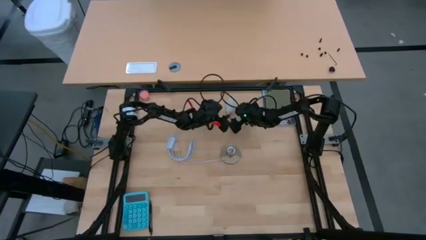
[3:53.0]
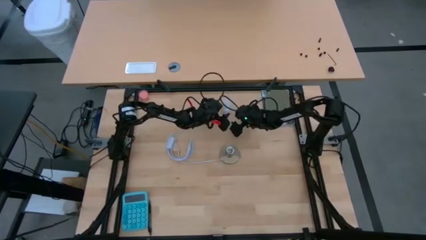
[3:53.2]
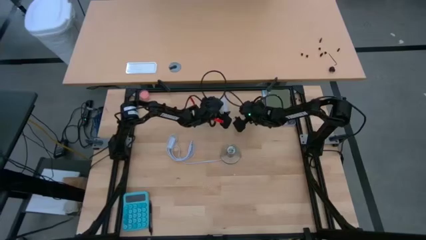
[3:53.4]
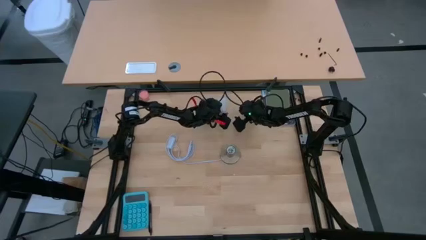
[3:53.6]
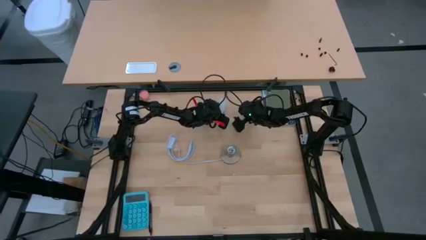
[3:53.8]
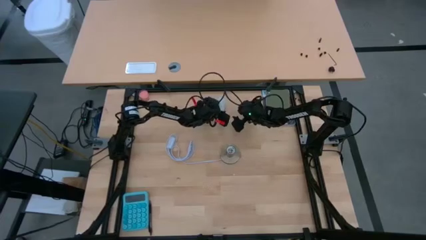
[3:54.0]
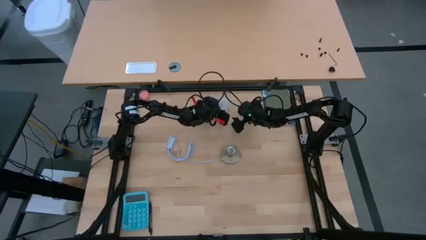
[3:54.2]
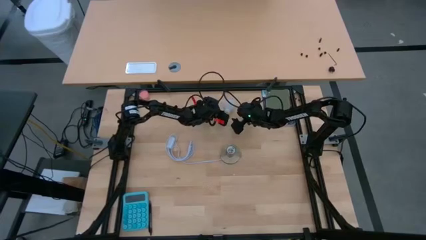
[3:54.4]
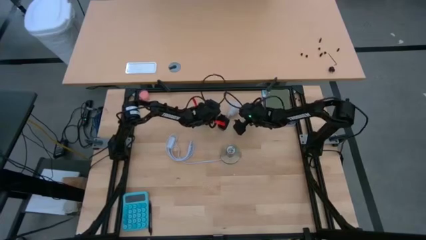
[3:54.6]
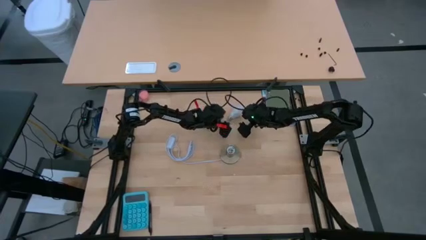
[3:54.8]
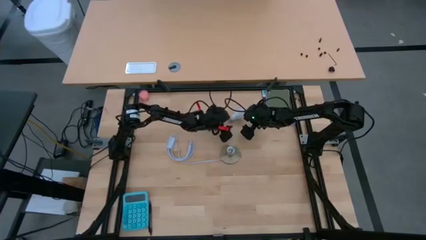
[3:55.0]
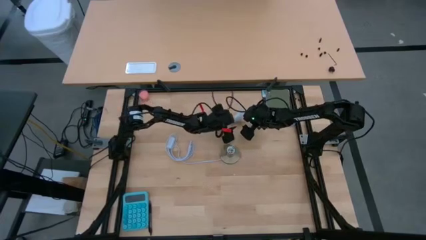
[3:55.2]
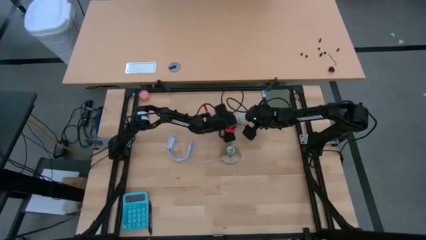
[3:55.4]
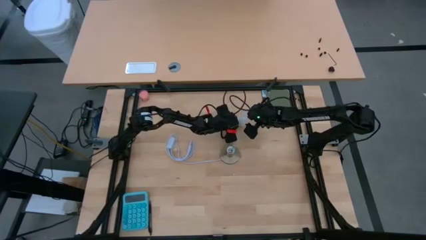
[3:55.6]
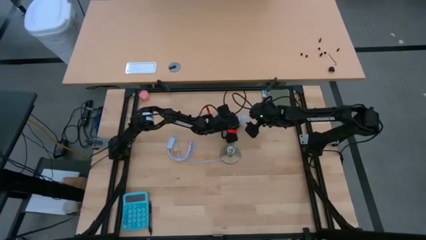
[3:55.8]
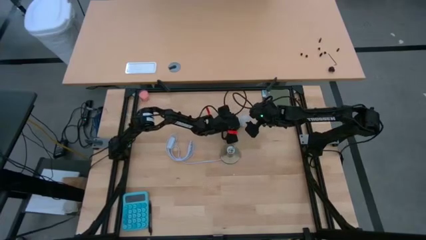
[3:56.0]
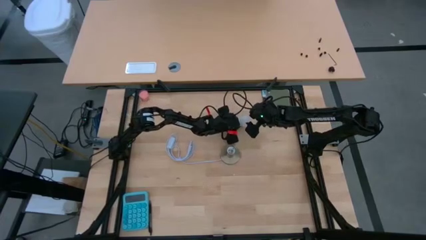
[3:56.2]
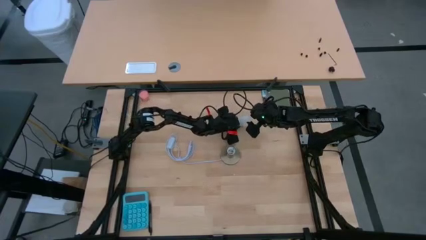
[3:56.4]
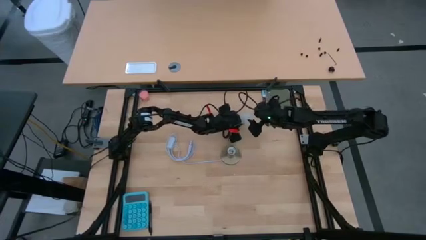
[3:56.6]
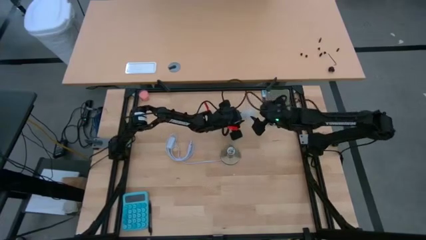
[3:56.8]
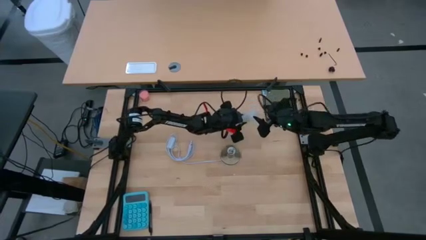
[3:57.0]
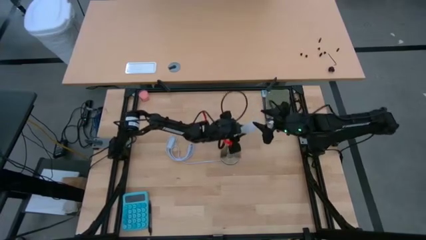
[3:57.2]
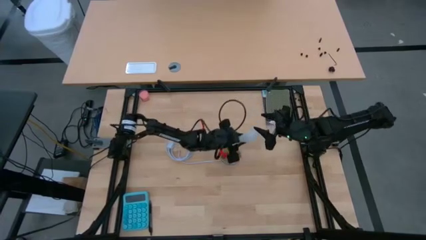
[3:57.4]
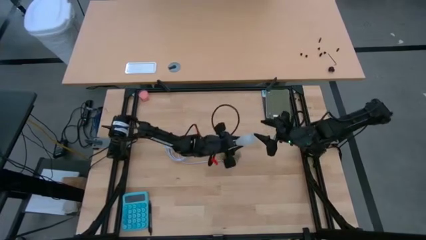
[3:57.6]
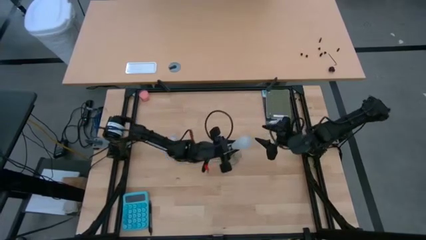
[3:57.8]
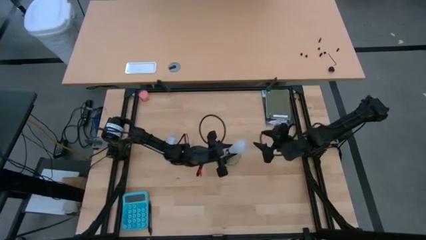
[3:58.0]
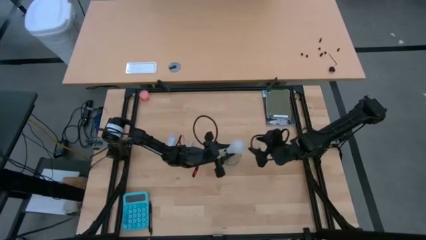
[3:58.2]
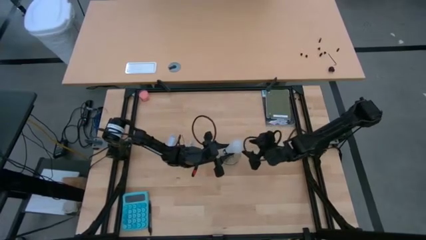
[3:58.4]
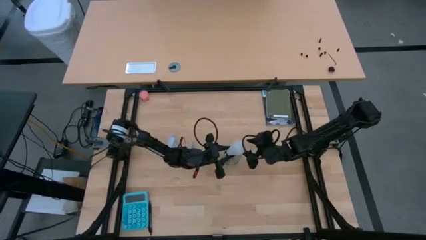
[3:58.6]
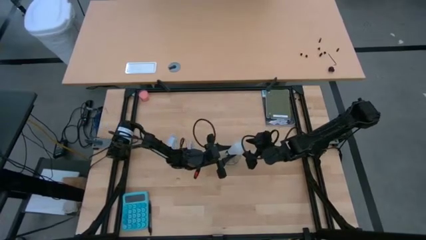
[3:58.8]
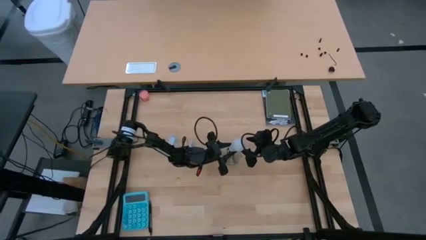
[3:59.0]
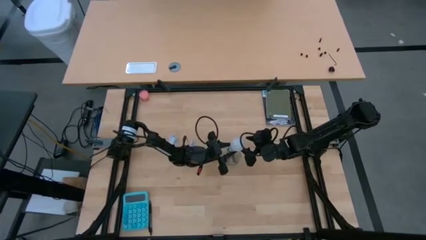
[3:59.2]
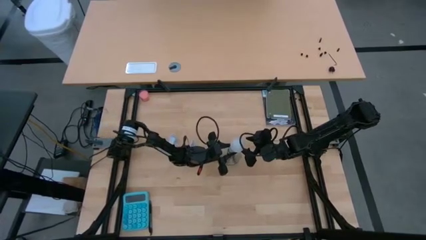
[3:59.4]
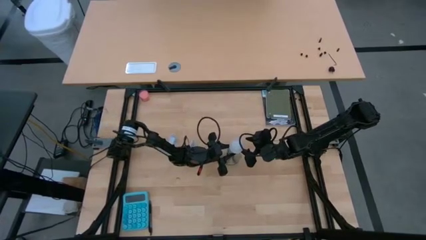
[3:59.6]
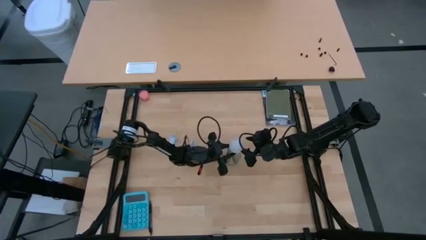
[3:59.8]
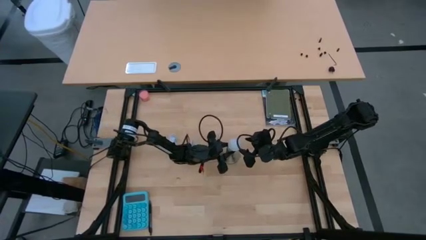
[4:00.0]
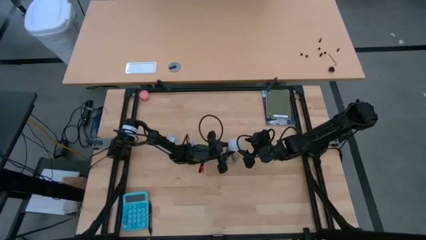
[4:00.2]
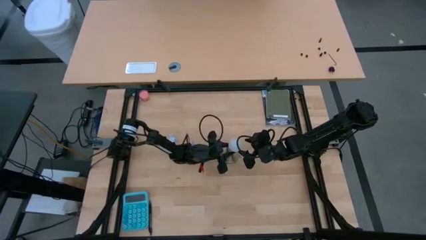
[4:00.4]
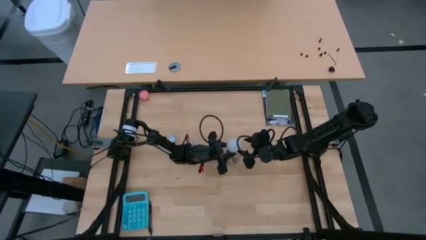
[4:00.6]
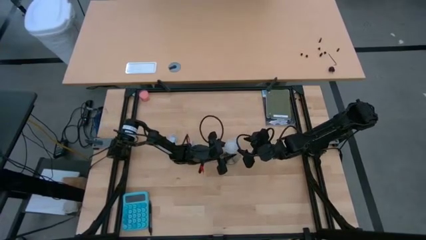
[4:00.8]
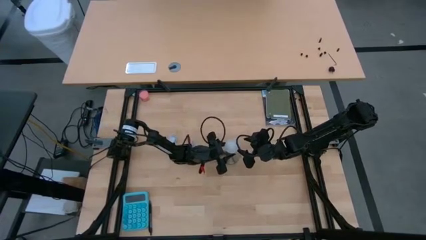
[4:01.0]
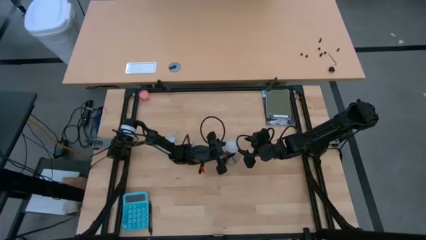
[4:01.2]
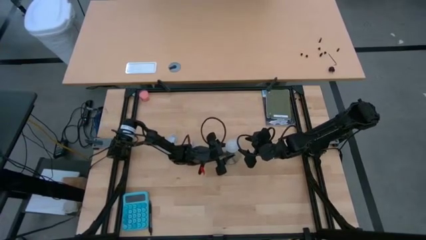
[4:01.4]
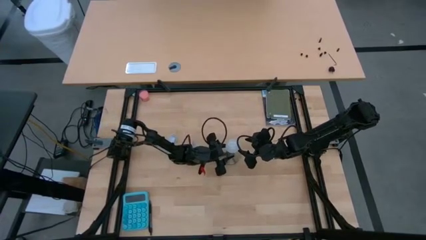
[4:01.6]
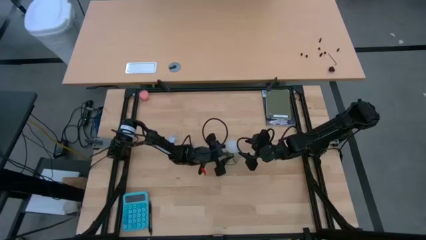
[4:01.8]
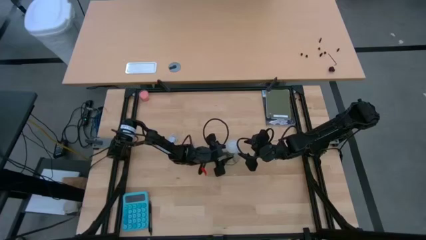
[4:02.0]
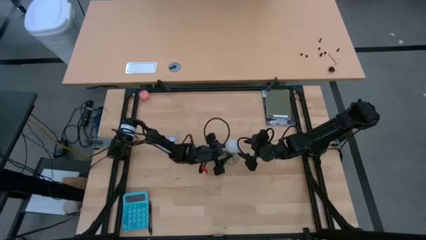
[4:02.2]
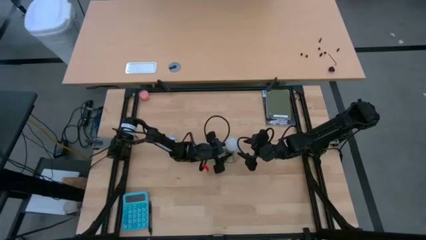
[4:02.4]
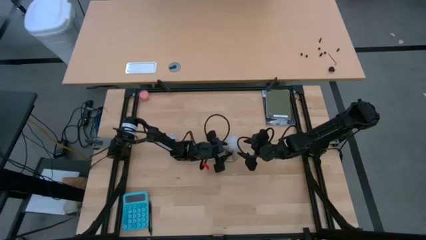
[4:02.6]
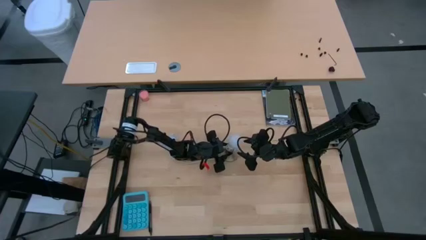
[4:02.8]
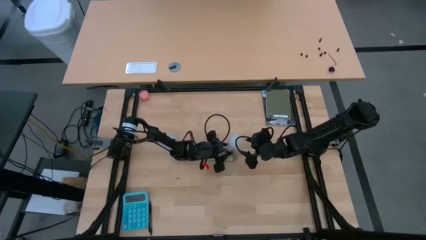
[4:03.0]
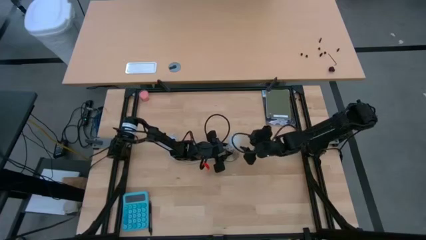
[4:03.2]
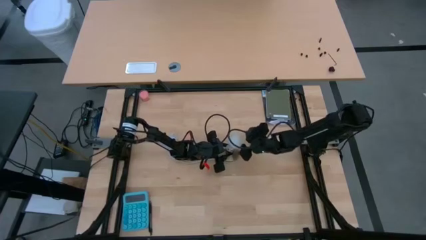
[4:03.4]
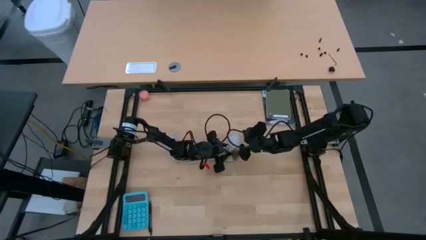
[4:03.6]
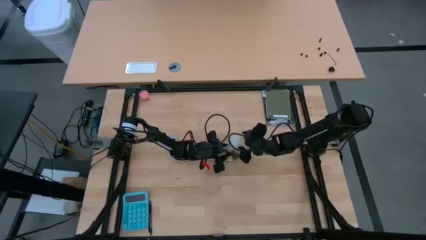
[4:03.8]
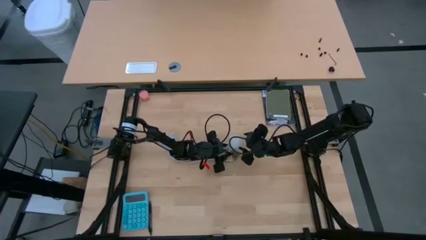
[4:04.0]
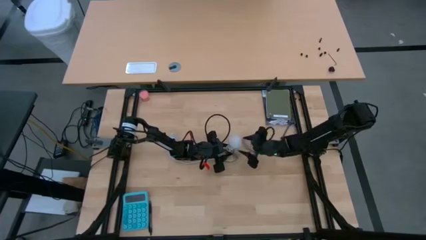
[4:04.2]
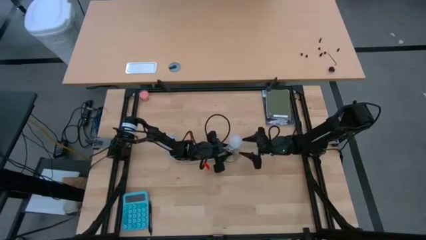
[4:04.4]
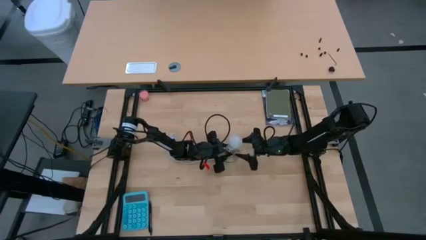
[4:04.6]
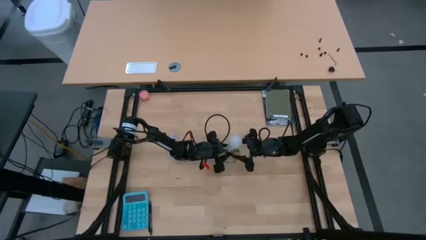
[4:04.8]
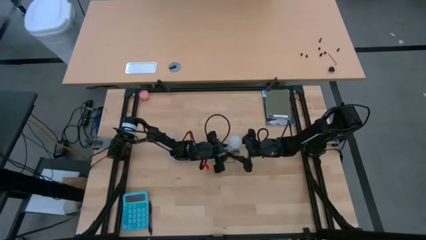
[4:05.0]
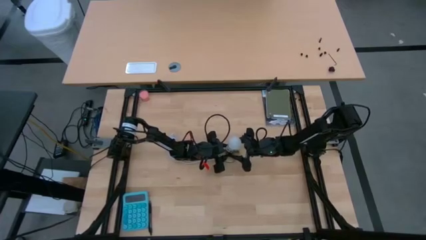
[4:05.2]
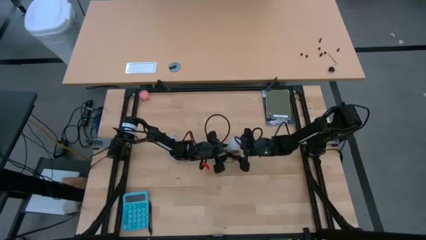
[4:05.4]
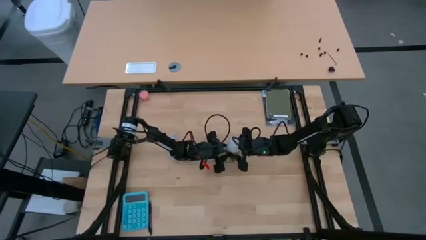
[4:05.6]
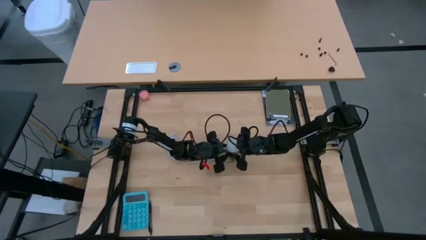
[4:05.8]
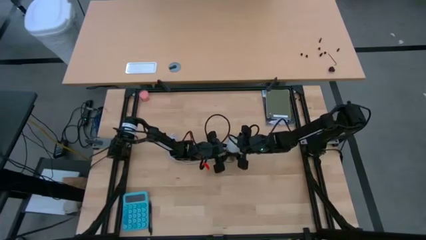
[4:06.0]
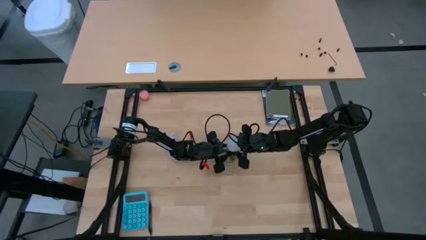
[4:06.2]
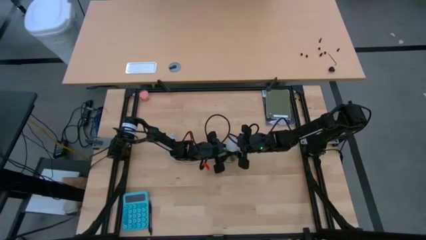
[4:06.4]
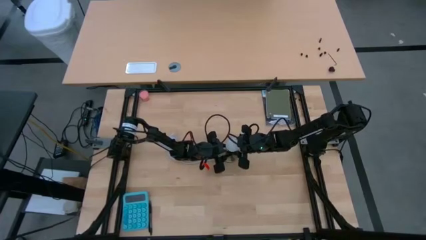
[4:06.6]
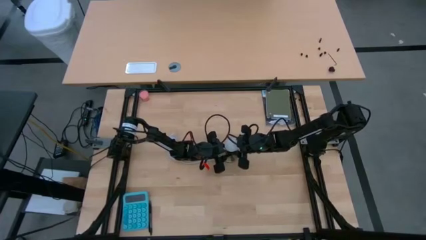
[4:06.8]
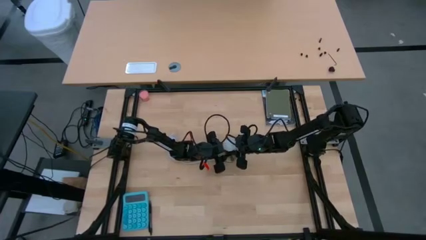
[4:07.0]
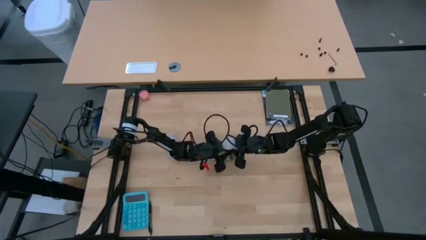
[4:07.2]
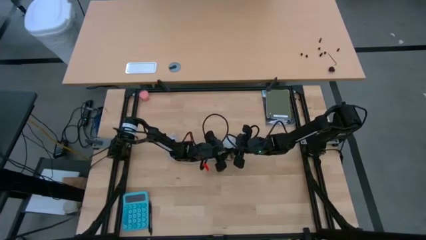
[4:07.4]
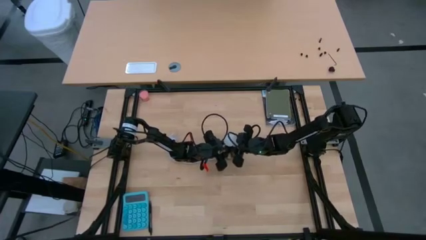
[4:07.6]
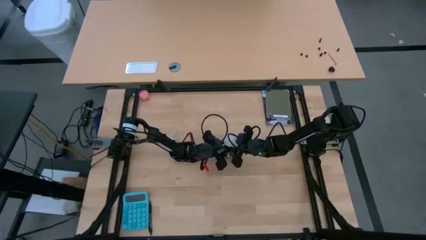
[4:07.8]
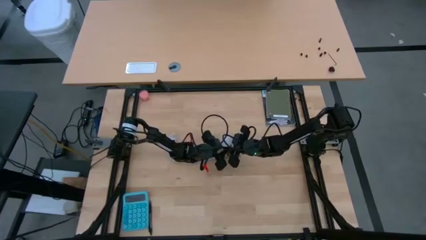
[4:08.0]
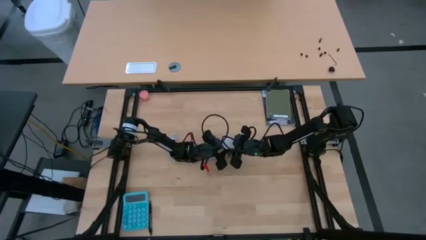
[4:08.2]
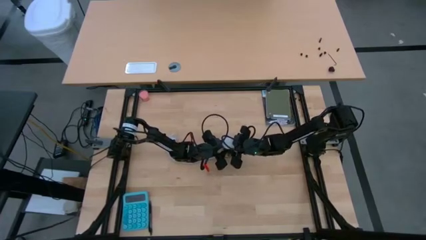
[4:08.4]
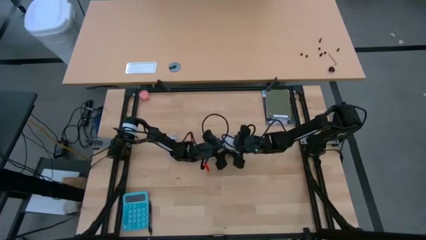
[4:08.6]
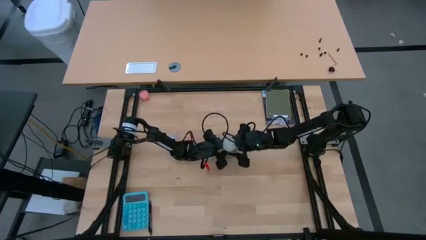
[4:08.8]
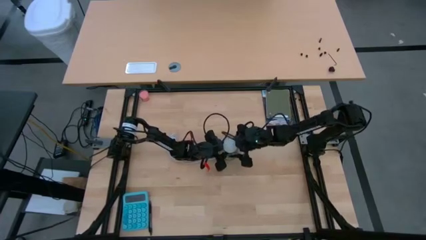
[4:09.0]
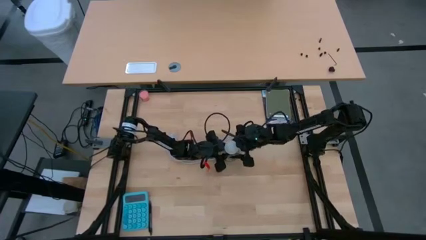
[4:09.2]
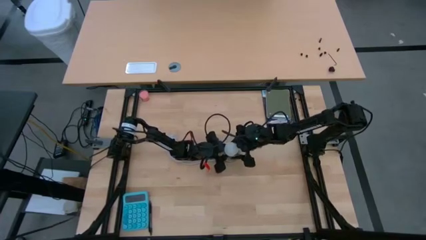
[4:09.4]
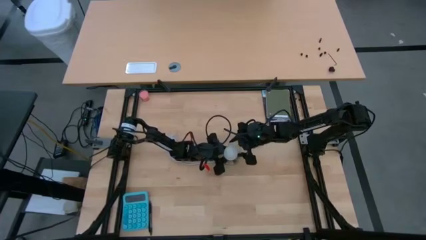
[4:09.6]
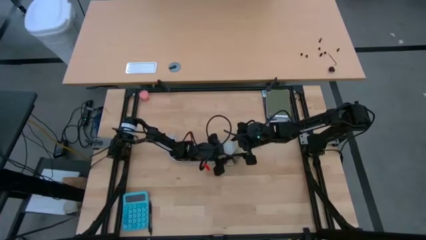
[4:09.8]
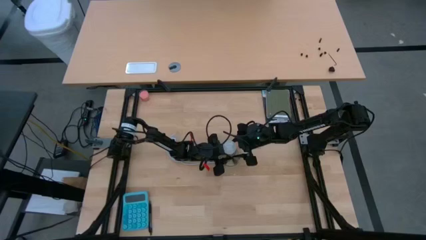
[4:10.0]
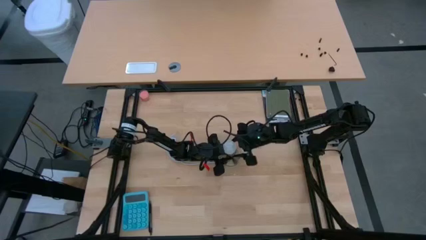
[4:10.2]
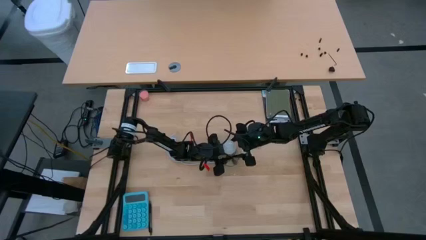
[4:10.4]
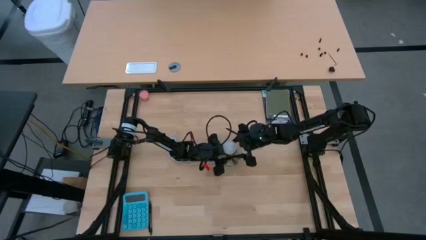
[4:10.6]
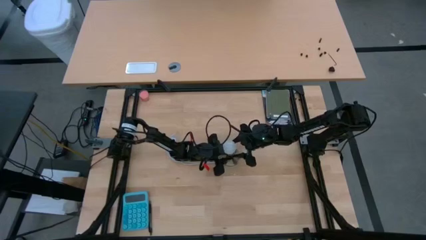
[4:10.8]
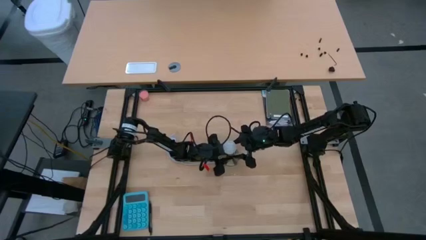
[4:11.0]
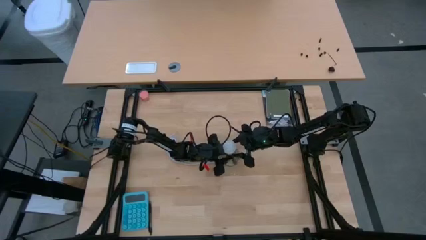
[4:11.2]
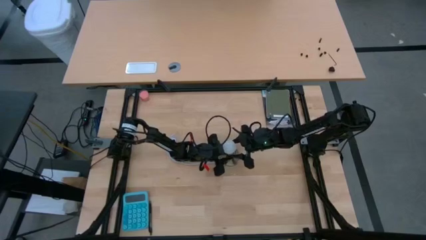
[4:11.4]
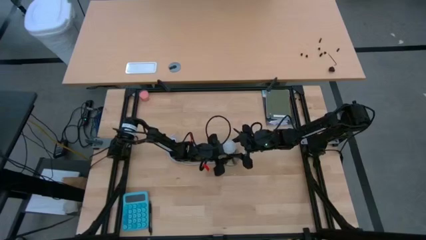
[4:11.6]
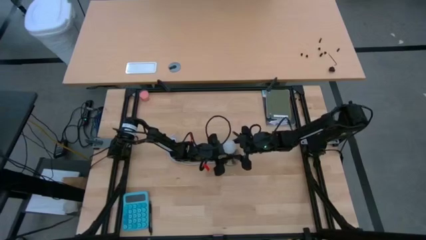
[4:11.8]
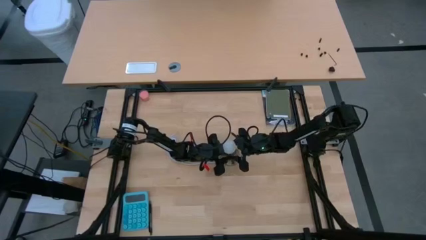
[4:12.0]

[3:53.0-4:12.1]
Task: Screw lightbulb
Insert the lightbulb into the lamp holder
